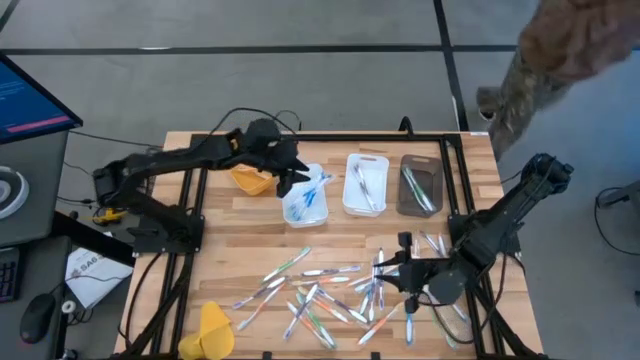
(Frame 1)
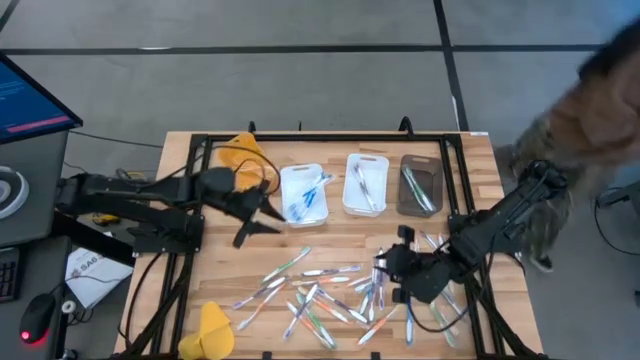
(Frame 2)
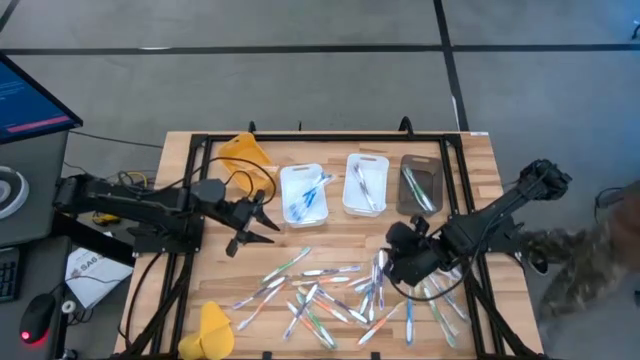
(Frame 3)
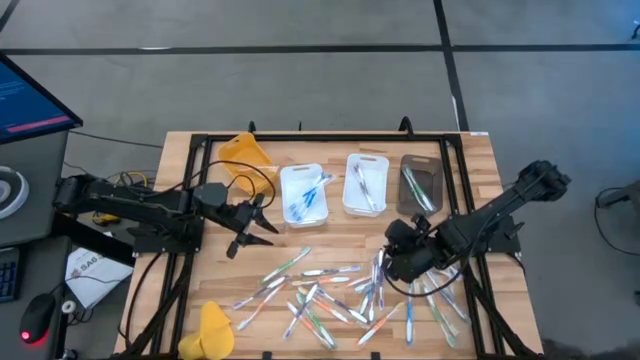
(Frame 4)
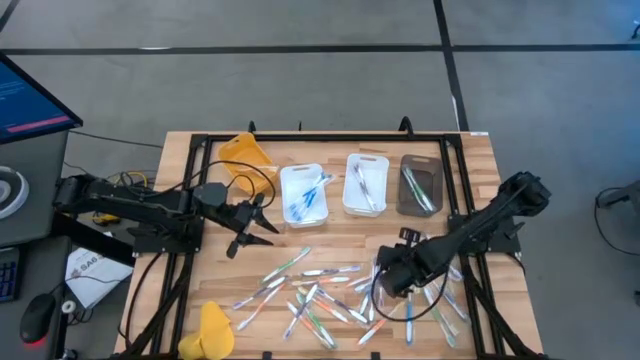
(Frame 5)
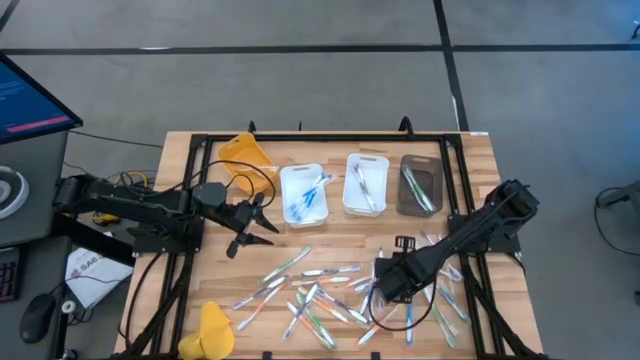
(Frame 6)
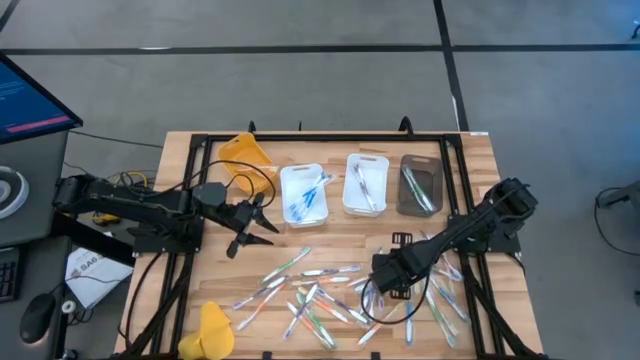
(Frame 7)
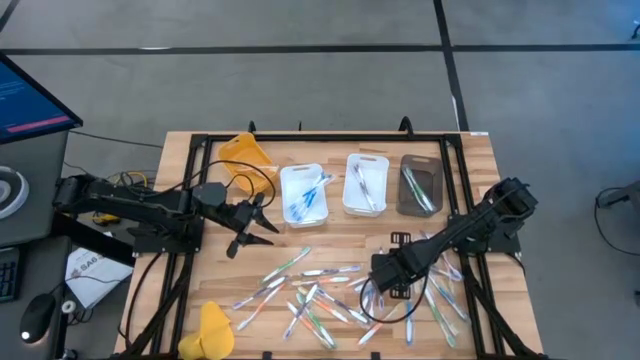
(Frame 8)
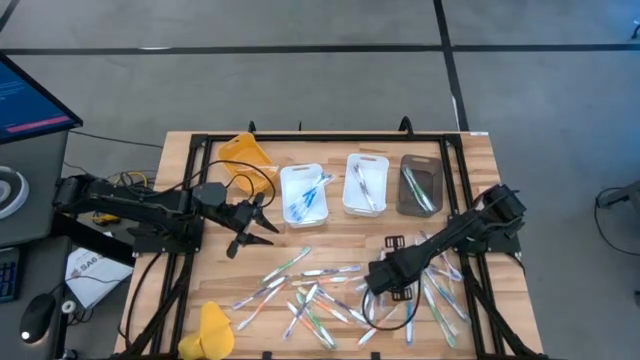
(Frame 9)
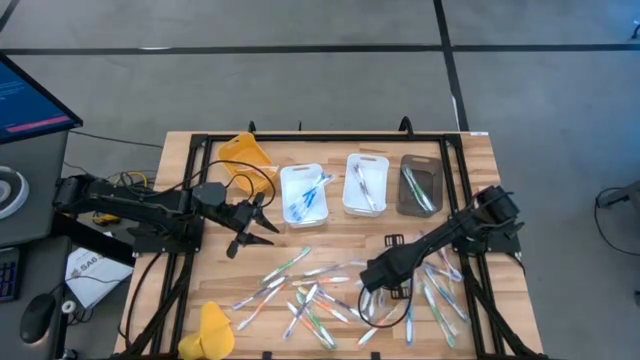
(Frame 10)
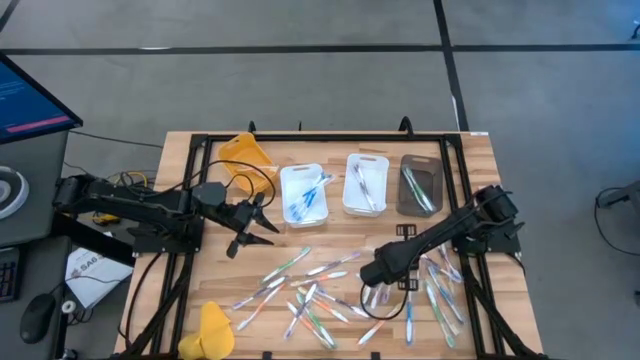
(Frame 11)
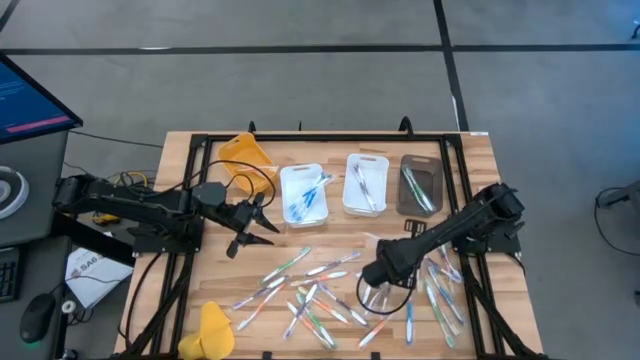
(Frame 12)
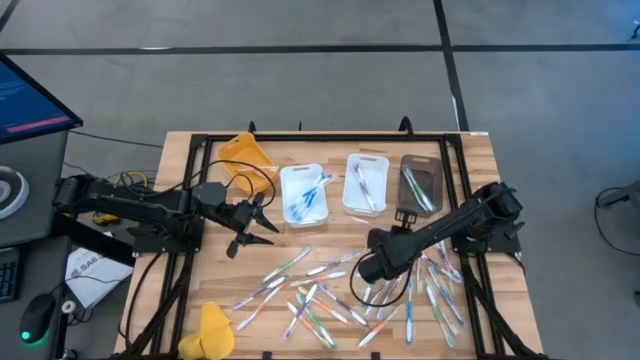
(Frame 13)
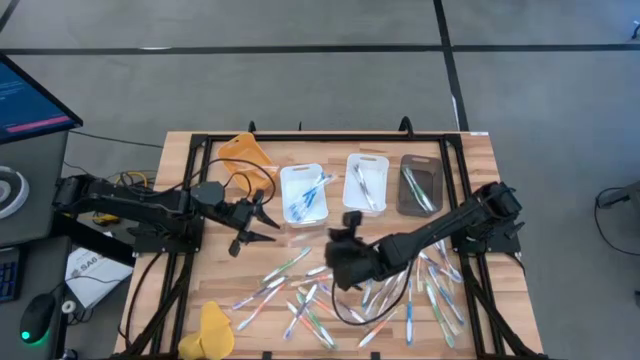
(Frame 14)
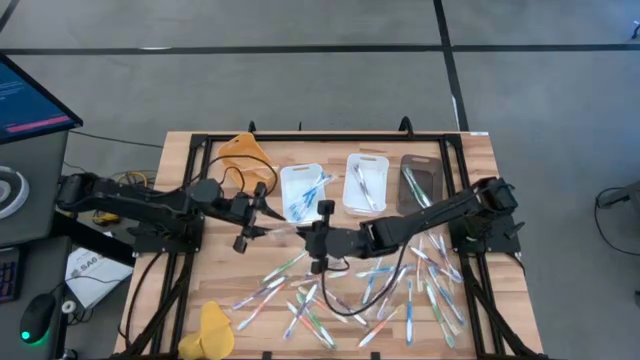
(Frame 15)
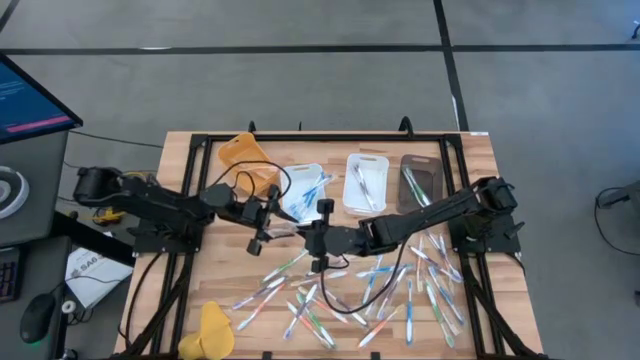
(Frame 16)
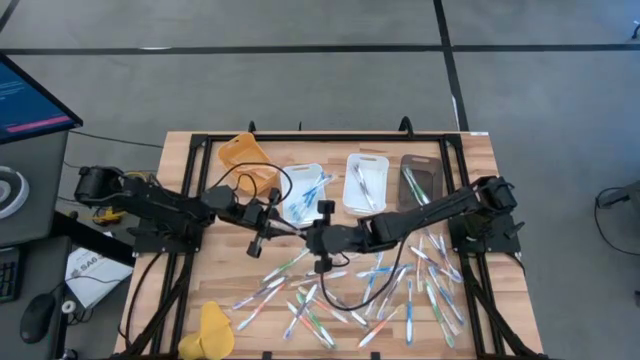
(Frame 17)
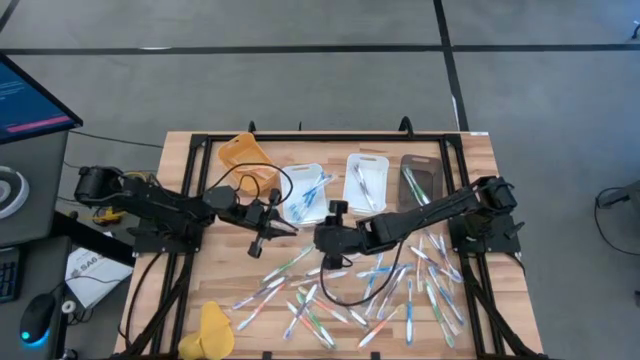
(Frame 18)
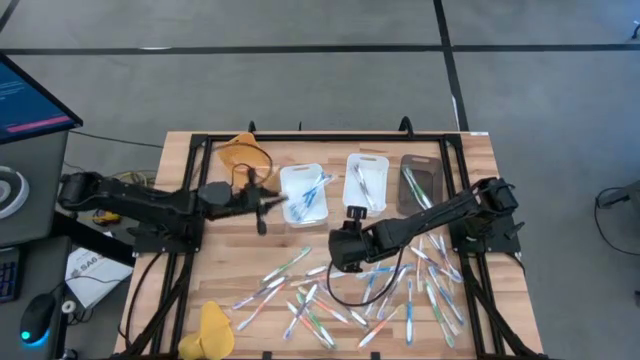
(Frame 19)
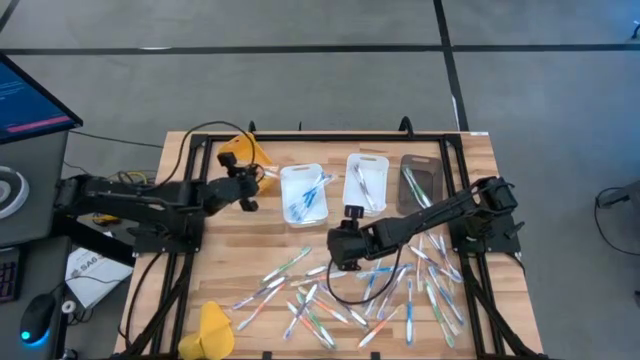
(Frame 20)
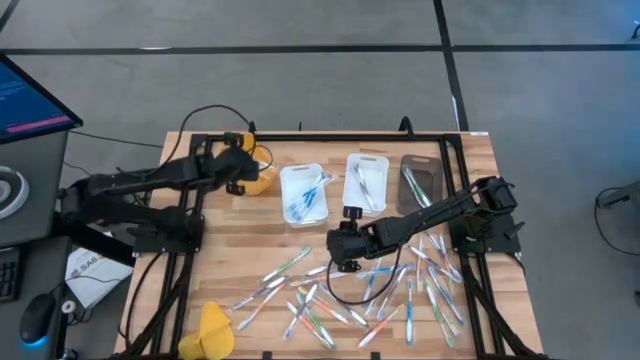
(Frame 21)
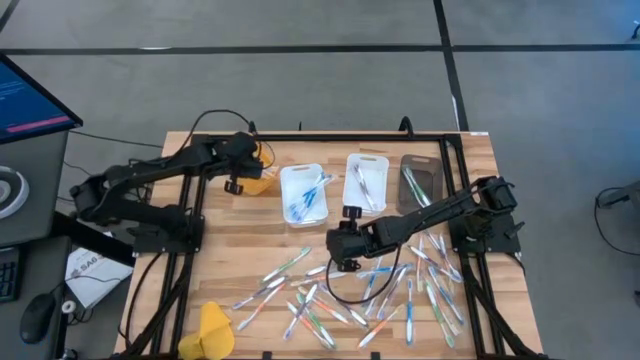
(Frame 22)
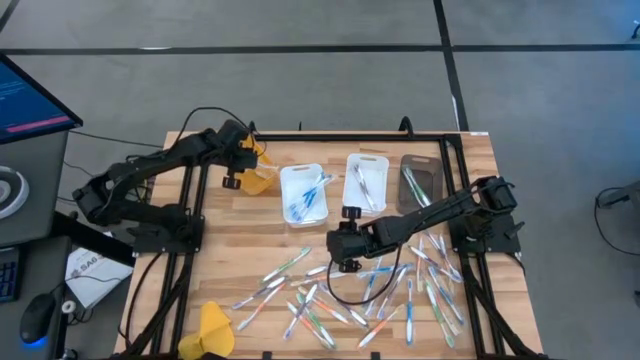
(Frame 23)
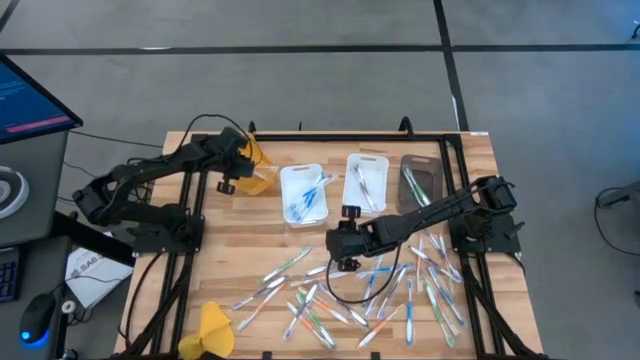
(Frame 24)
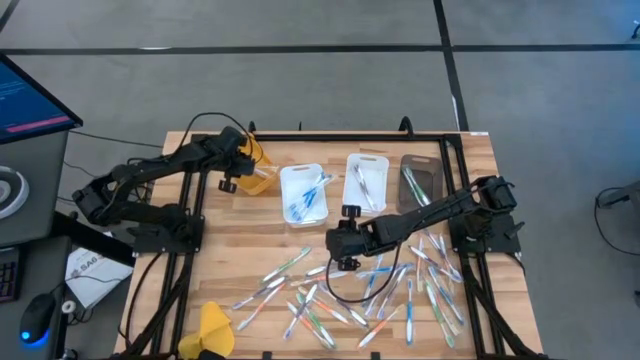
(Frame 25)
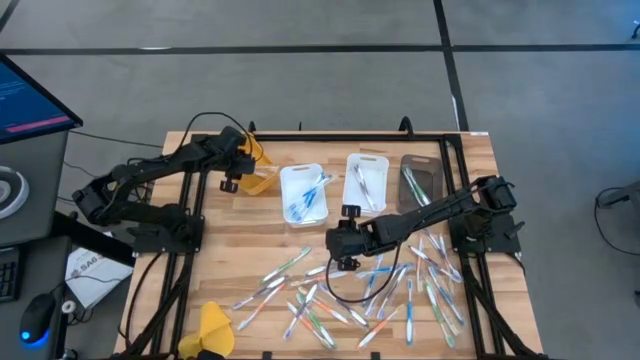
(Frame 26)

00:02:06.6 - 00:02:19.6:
Task: Pick & Place Toothbrushes
Put the orange toothbrush into the orange bin

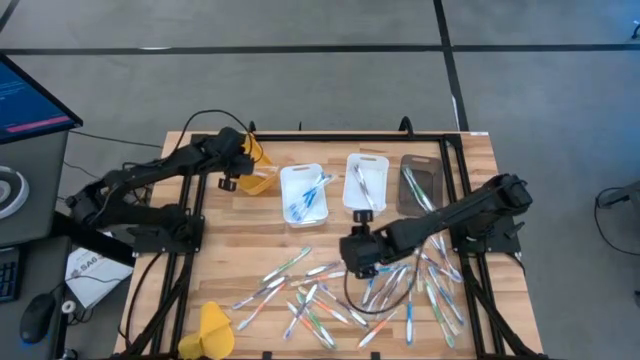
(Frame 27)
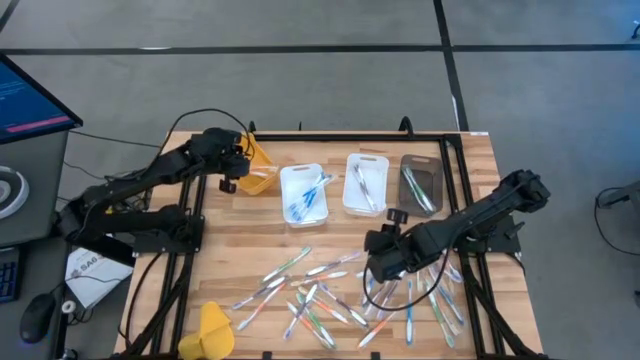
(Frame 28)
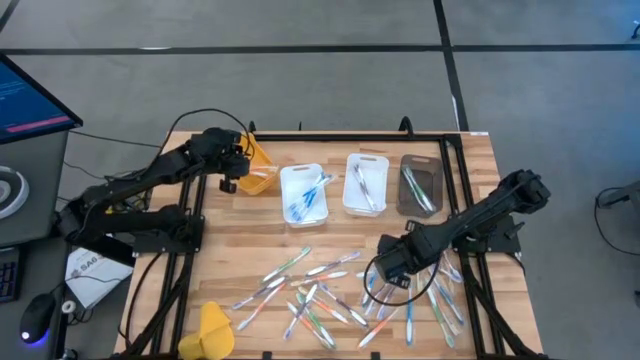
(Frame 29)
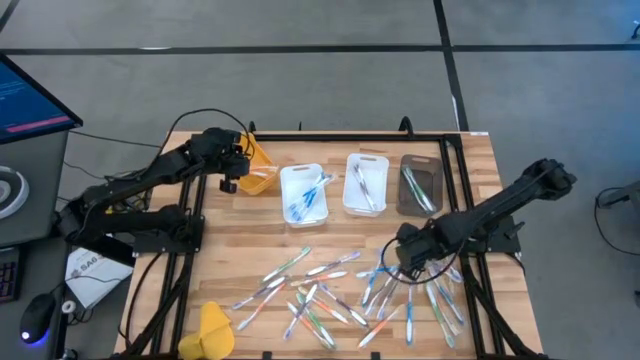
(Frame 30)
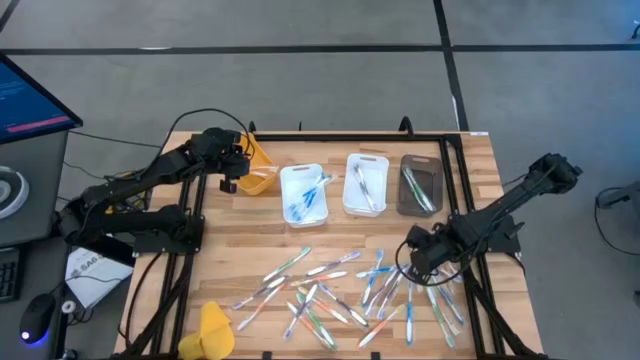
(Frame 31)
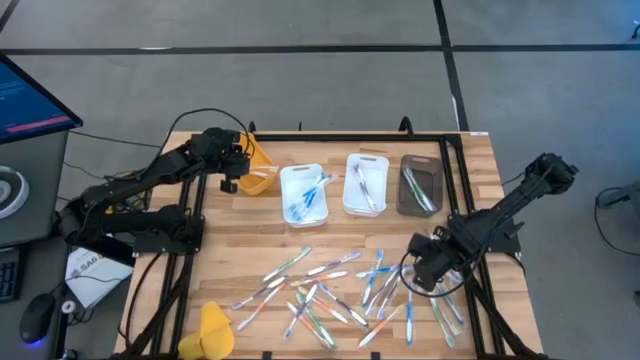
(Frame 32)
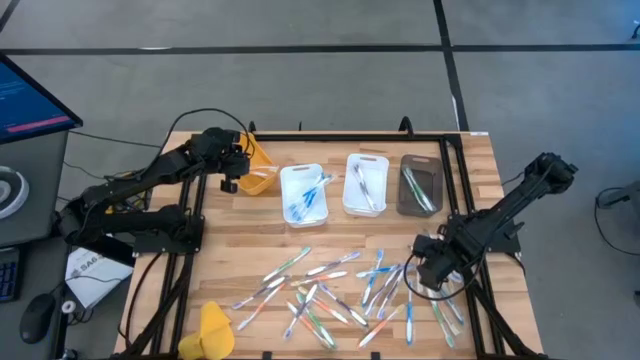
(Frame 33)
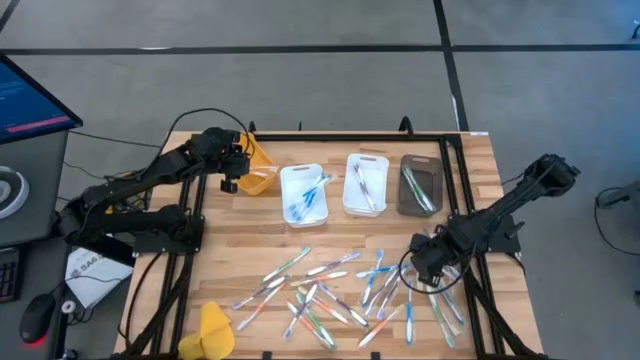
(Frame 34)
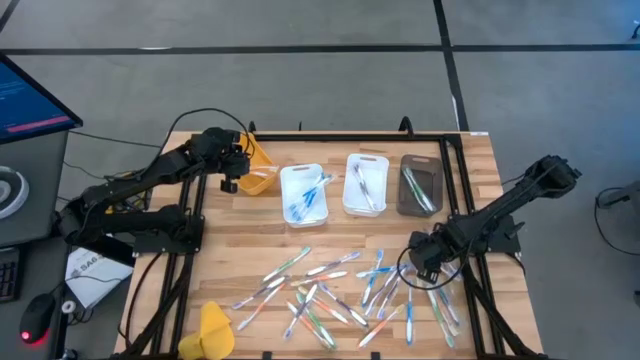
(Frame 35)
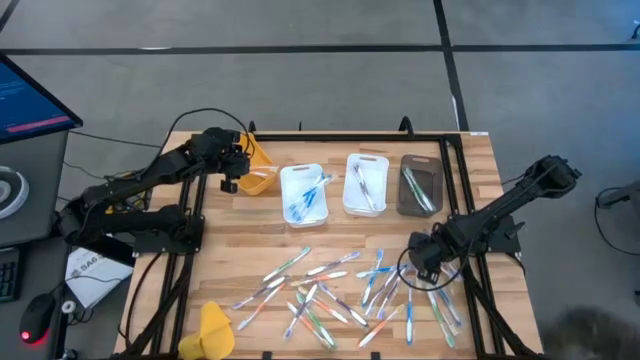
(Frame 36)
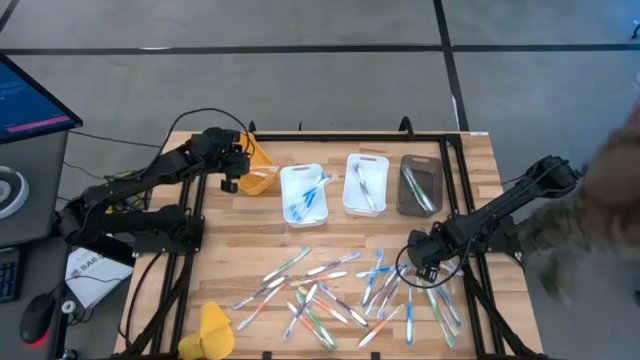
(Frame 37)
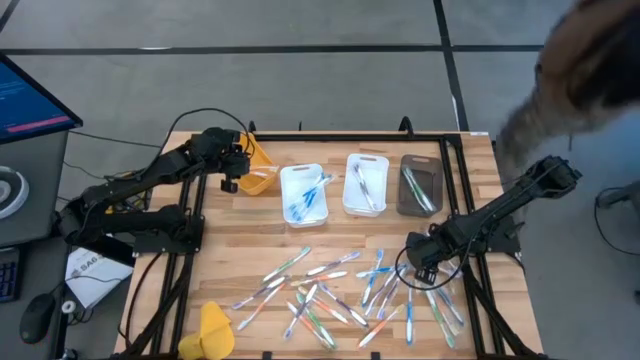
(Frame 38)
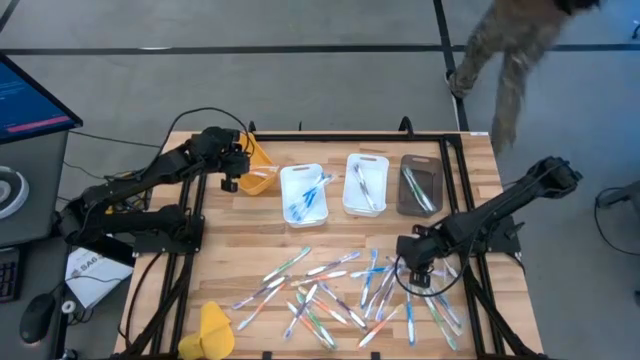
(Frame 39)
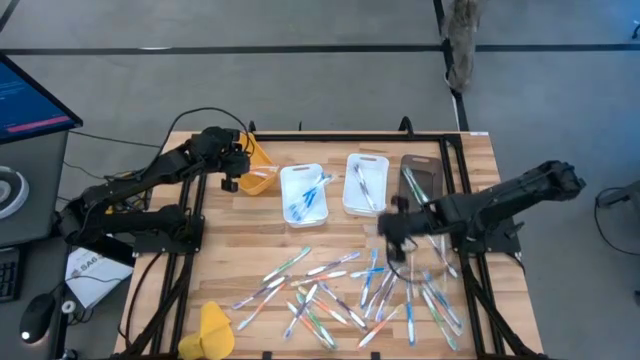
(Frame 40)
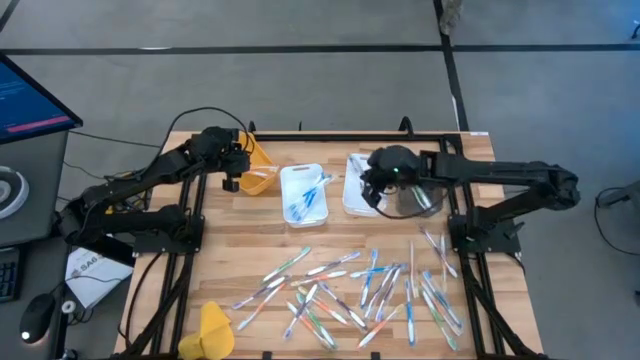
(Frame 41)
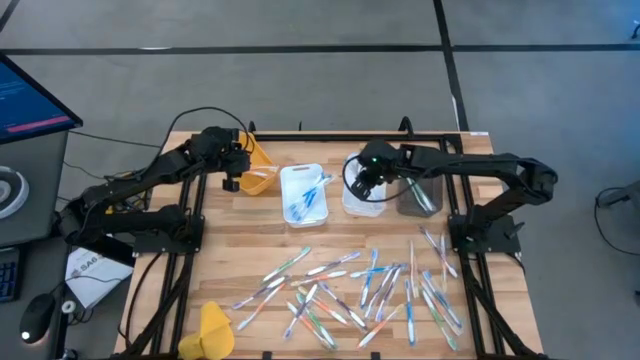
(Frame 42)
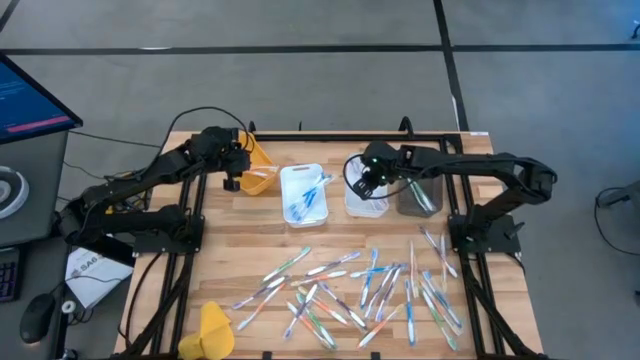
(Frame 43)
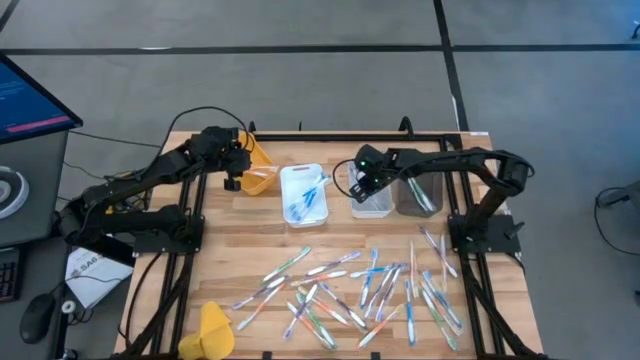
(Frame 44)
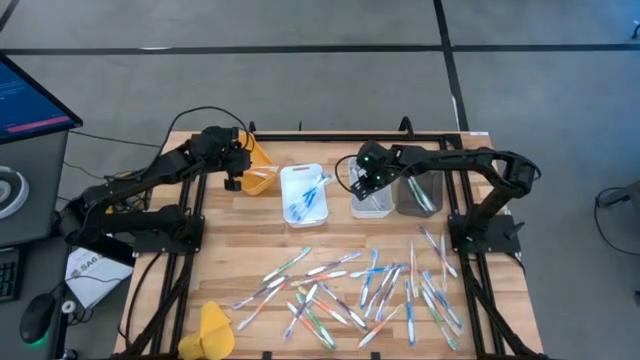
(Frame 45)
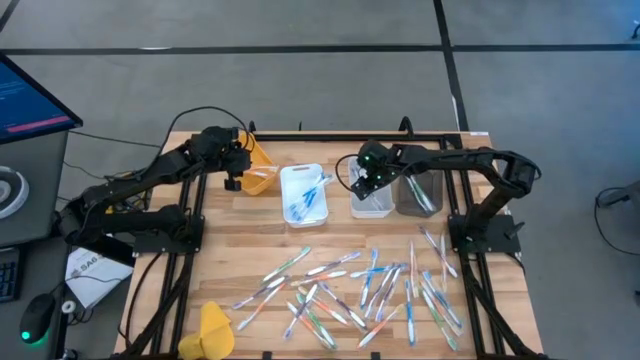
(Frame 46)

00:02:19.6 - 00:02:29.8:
Put the purple toothbrush into the right white bin
